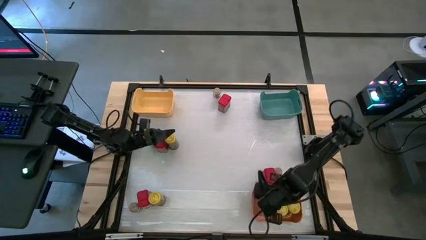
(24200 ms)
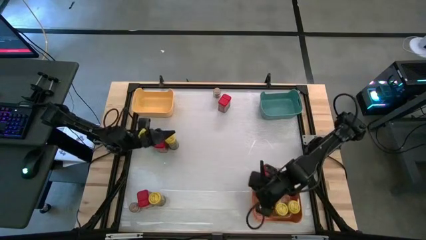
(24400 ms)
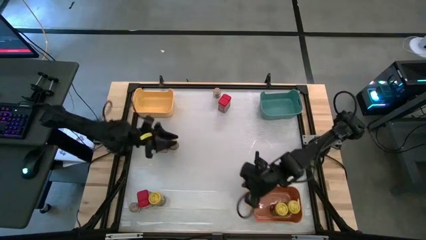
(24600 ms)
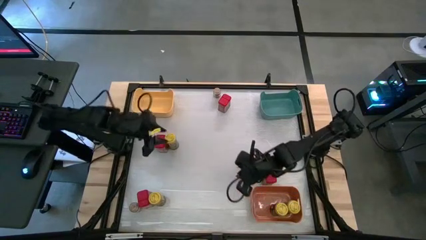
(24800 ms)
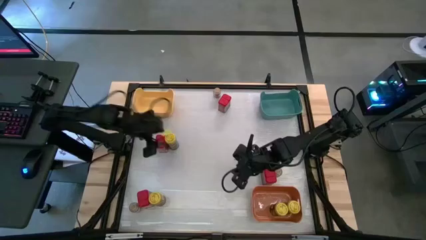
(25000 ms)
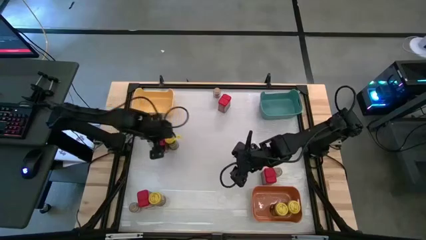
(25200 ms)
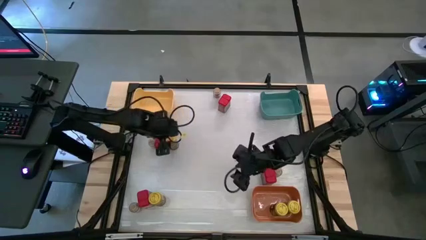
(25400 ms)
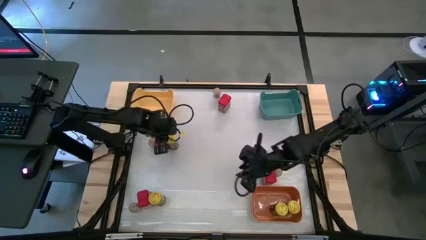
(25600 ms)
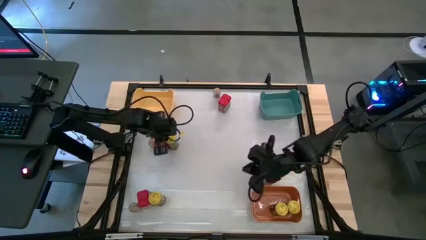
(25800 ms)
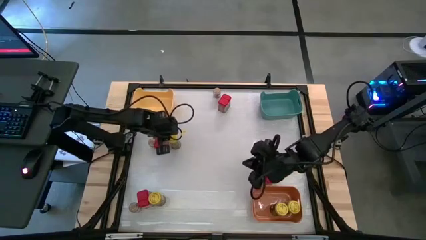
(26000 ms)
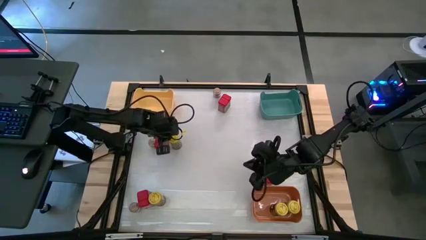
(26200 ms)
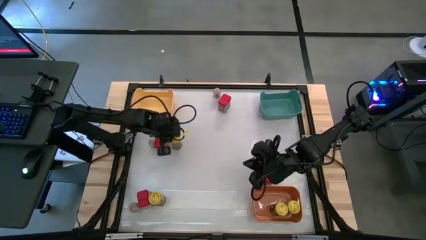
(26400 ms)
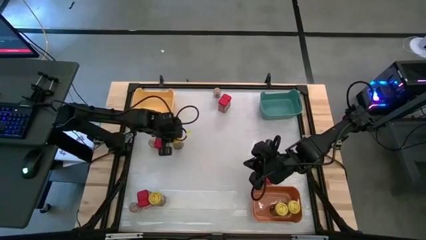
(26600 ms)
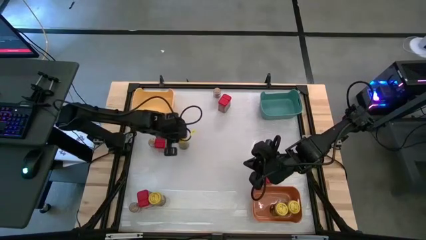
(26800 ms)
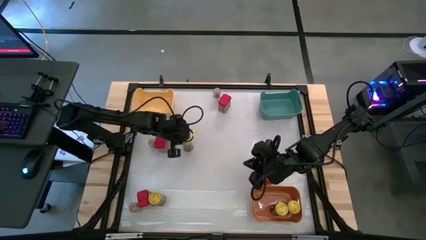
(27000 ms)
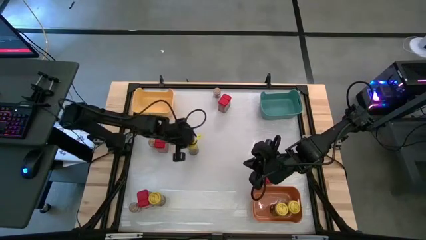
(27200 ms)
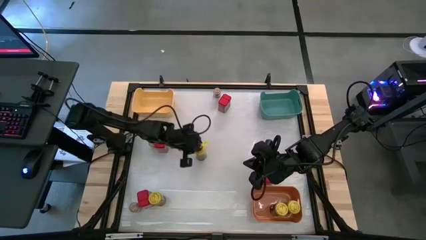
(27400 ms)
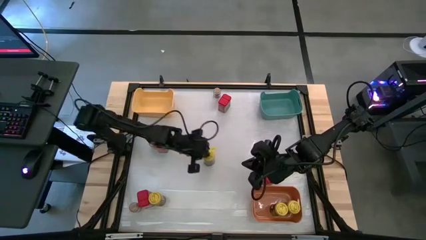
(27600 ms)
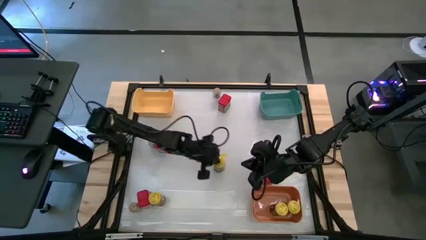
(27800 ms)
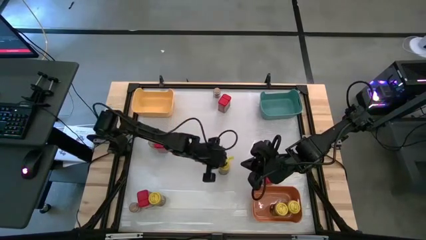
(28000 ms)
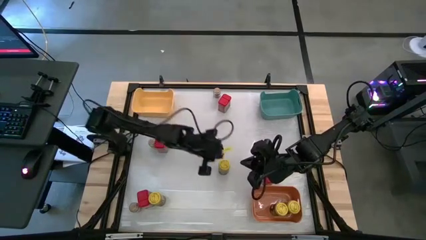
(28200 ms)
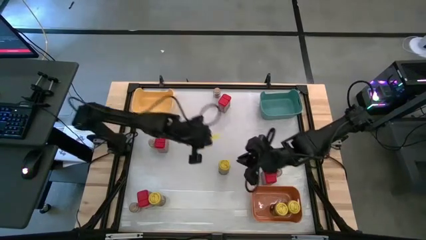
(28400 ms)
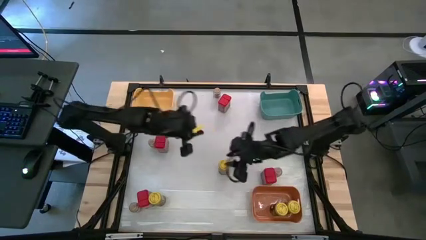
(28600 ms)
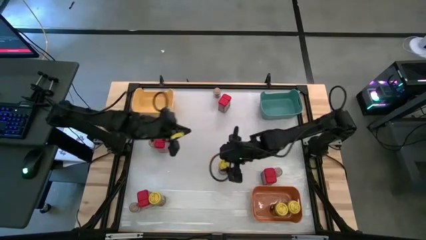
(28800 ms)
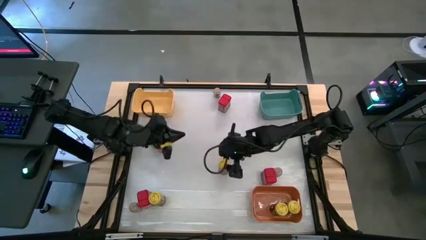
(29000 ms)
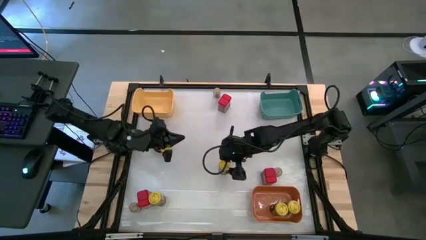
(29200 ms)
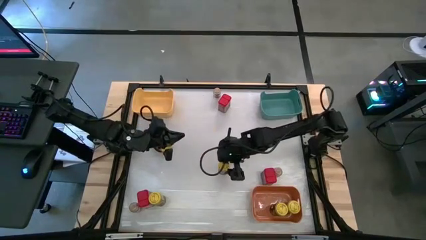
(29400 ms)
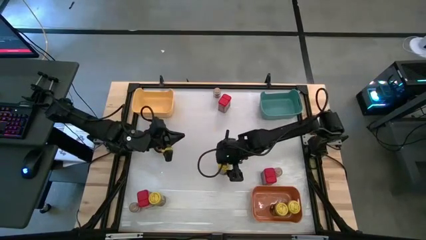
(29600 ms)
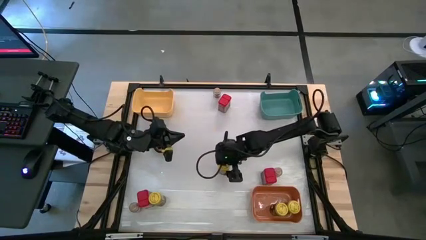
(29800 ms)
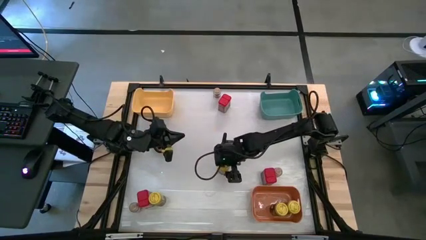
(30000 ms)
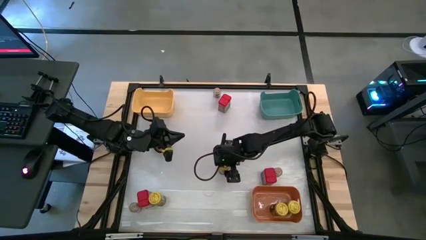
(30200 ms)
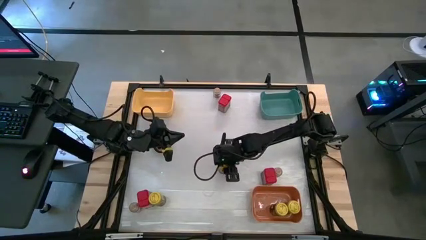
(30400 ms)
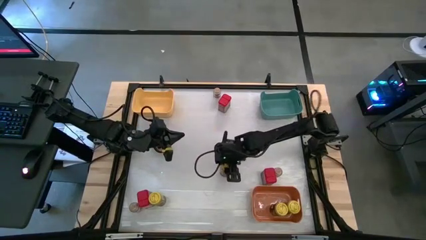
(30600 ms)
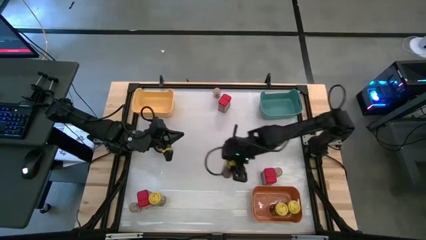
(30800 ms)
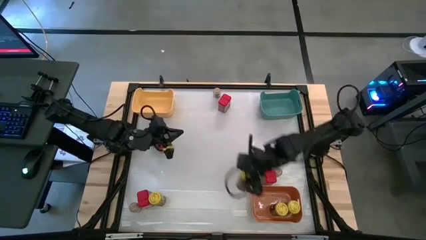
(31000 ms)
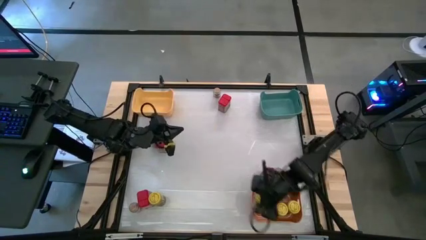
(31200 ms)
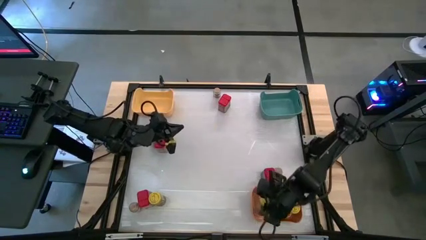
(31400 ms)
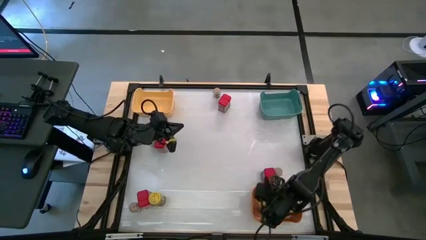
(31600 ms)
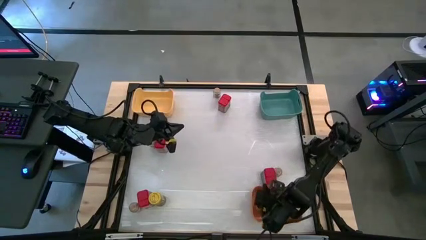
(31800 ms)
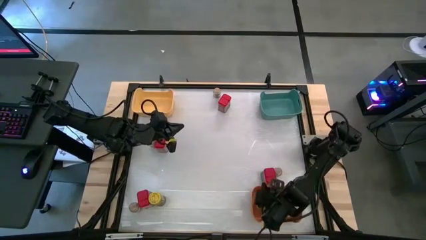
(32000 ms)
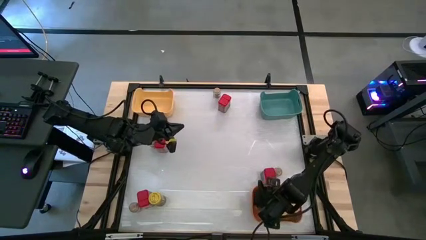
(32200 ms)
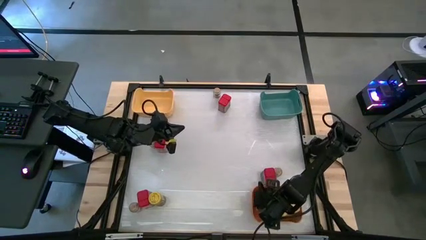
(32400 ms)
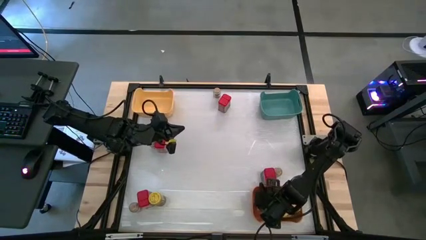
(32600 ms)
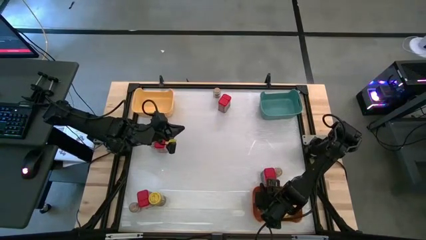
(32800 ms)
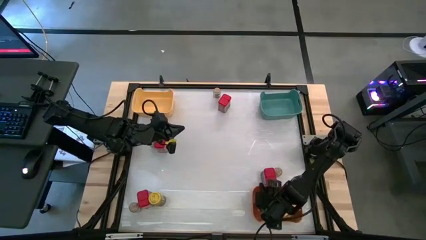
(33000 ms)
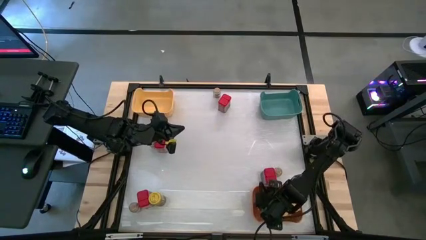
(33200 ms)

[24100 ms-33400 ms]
Task: Sort spices by type
Put the top yellow seasoning bottle into the orange bin

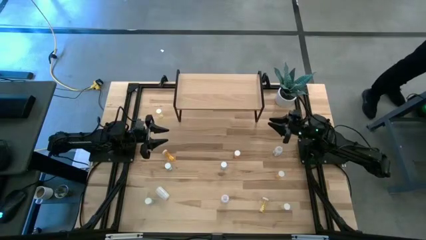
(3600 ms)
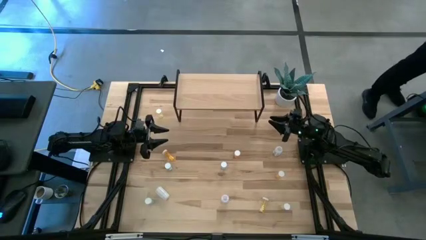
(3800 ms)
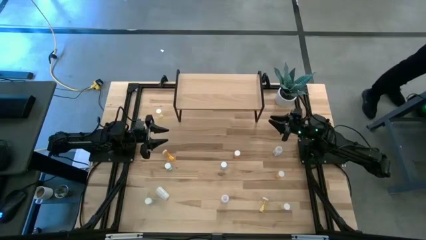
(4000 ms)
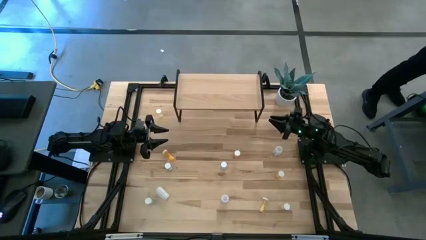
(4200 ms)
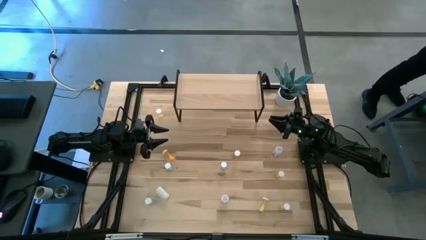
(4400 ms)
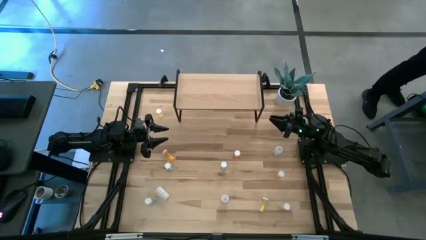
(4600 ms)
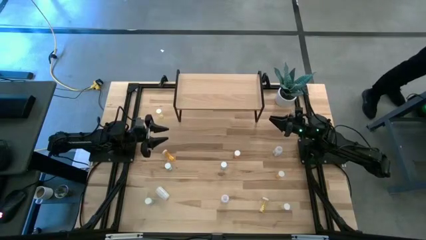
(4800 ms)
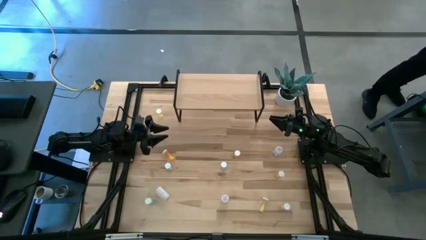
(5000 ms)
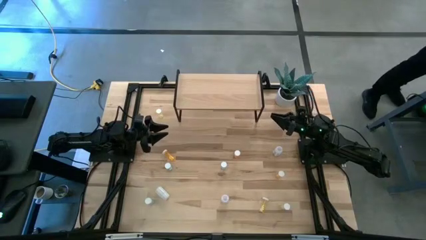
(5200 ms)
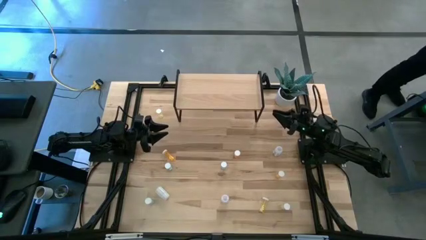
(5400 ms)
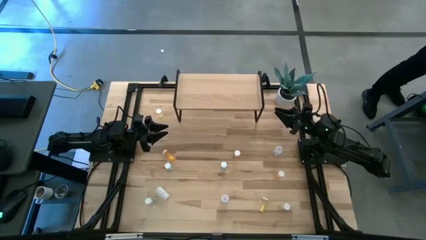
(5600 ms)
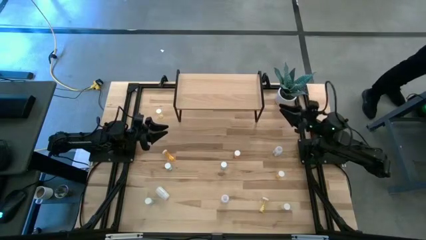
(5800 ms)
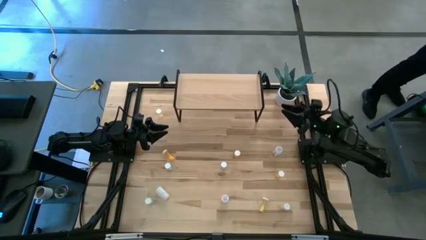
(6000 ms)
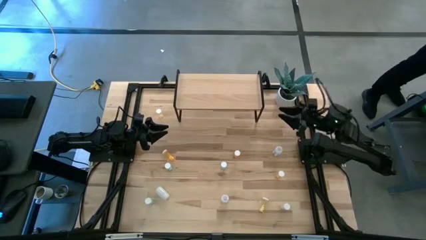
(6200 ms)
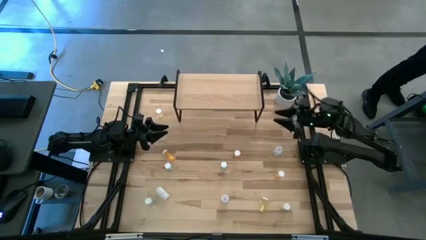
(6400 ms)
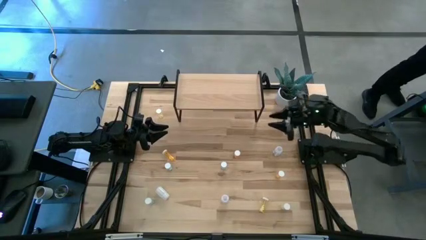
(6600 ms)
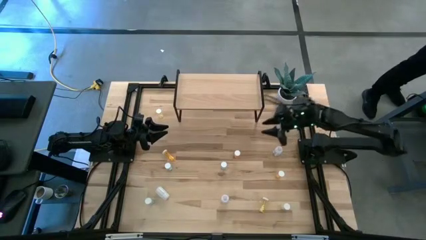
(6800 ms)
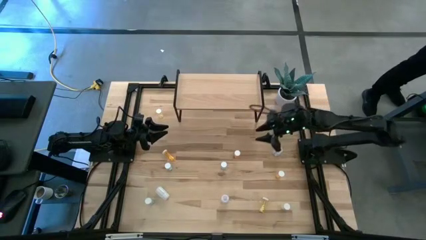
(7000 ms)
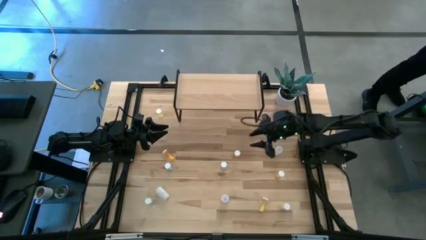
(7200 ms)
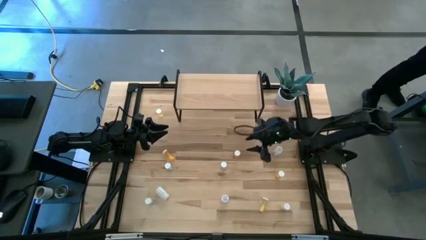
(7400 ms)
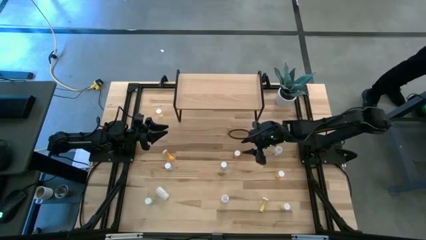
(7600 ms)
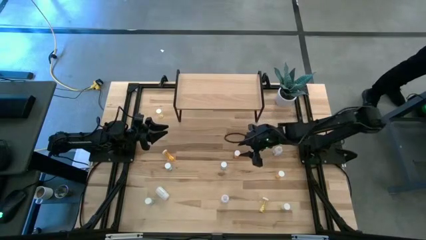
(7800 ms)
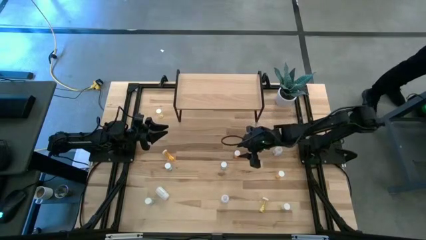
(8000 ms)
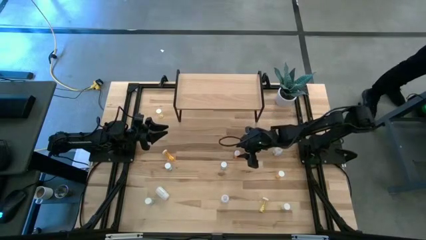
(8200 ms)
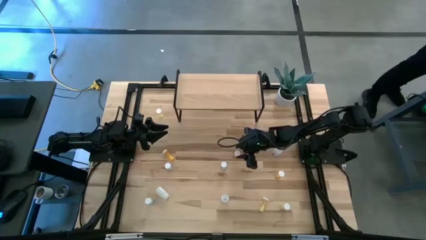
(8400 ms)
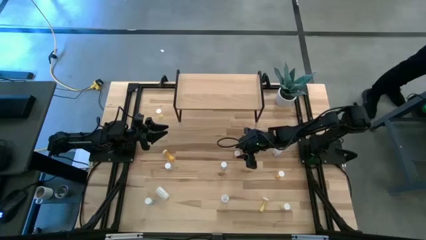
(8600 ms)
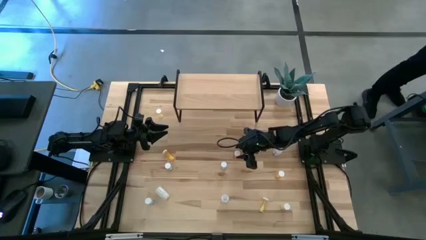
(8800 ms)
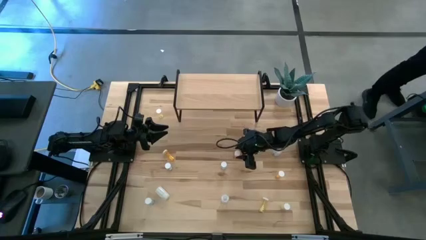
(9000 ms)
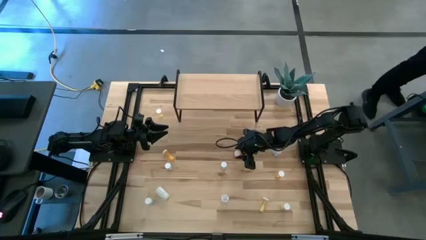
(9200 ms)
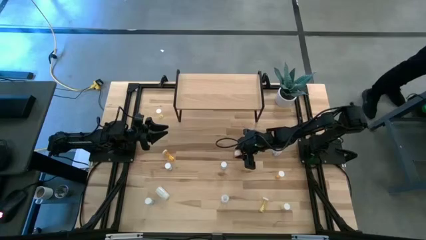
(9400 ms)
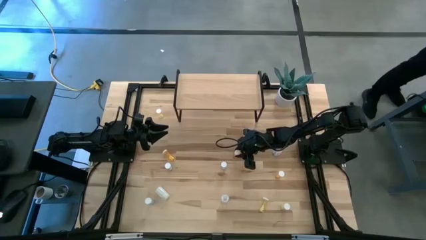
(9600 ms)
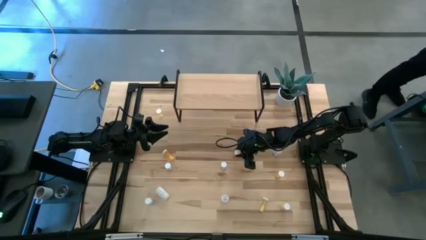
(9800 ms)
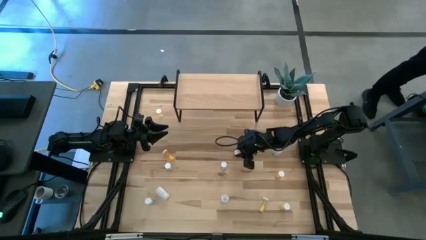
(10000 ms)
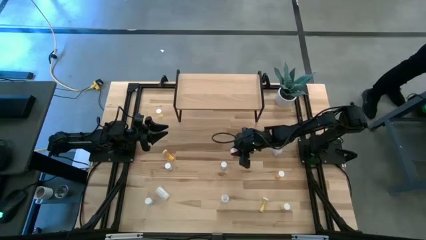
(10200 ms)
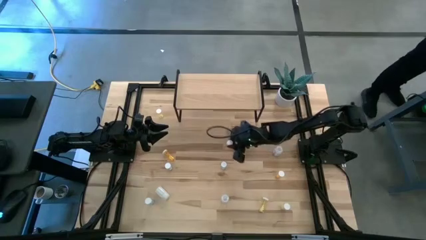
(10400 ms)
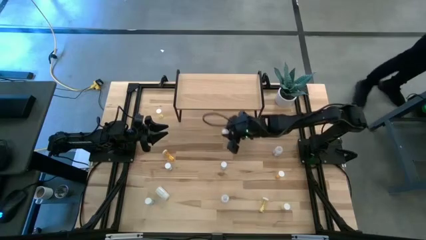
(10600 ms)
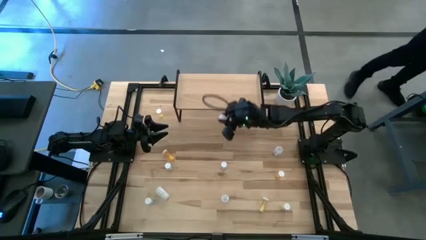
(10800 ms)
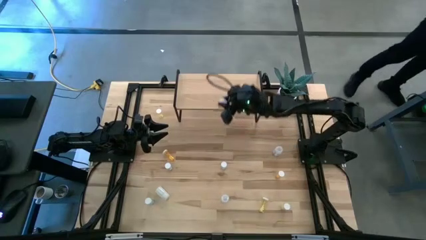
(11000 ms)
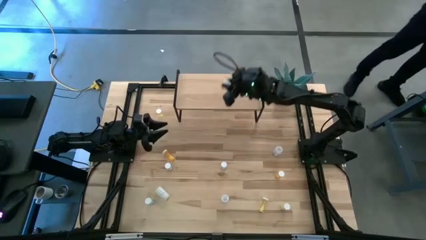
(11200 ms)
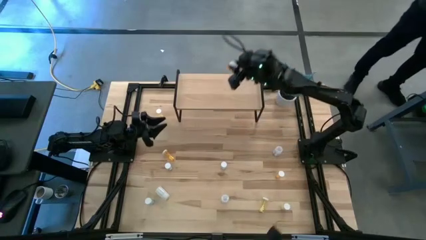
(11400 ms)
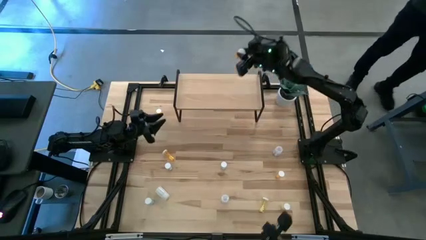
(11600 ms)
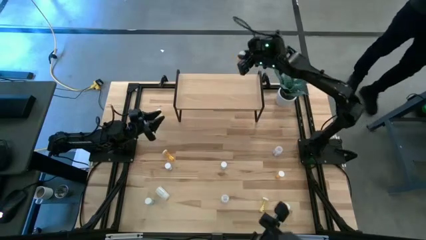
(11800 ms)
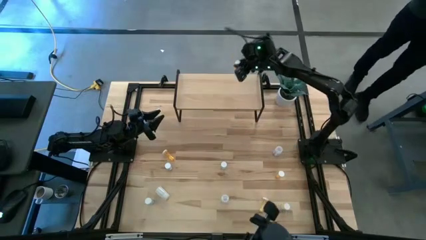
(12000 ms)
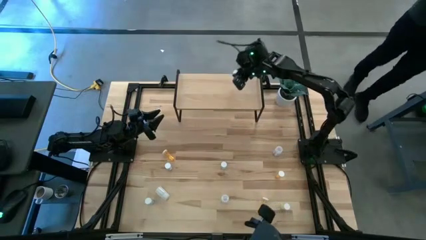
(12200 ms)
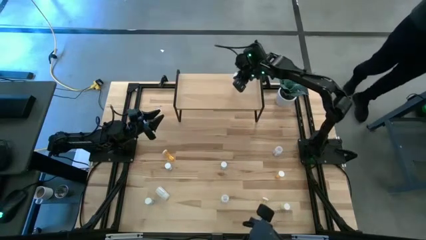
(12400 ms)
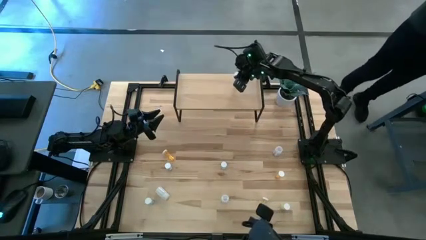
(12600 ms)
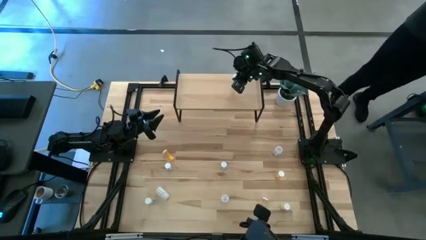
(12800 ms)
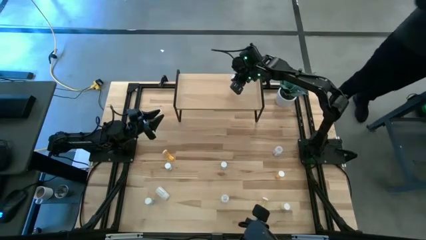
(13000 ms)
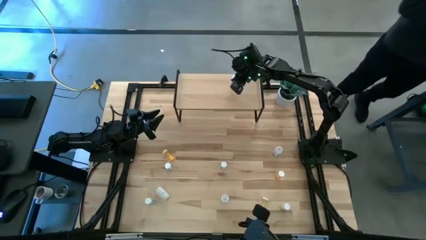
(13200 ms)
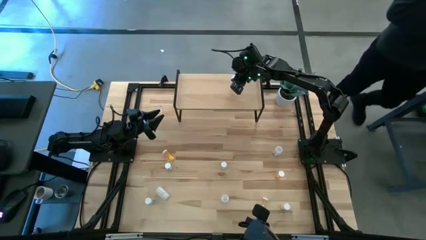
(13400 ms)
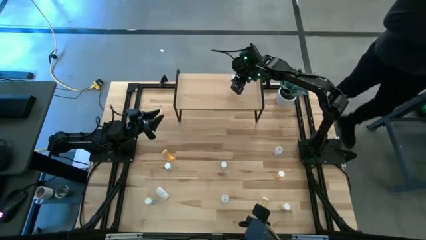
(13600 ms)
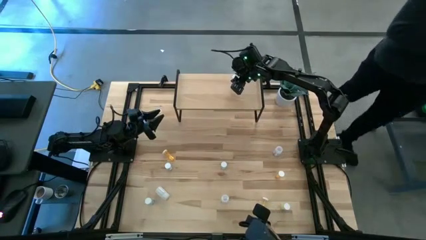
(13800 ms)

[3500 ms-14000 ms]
Task: Pick and place medicine bottles onto shelf by color
Put the middle orange medicine bottle on the shelf
